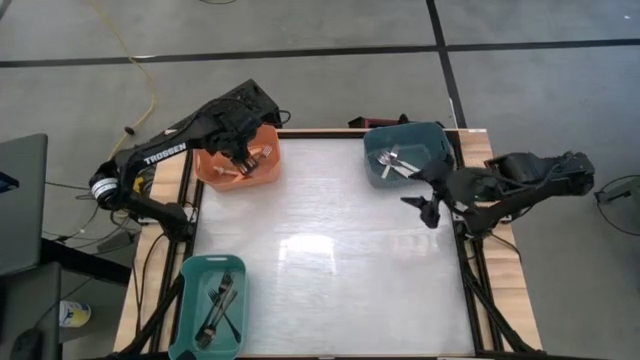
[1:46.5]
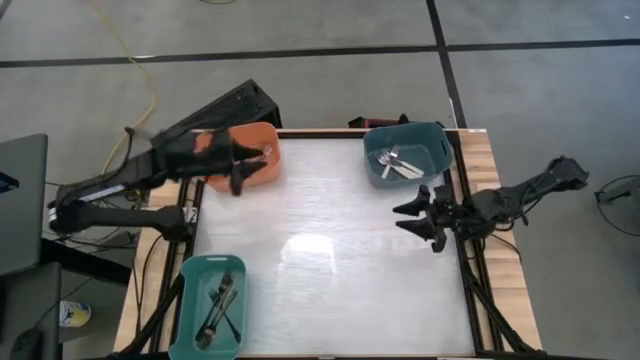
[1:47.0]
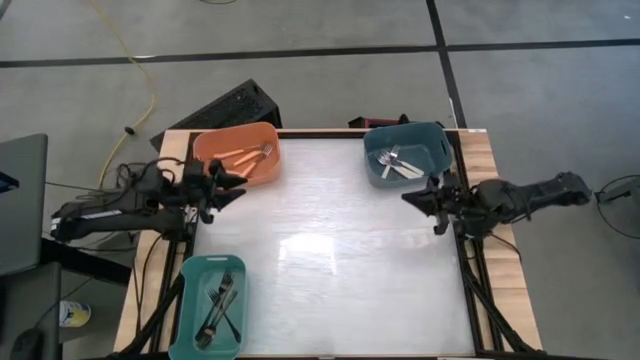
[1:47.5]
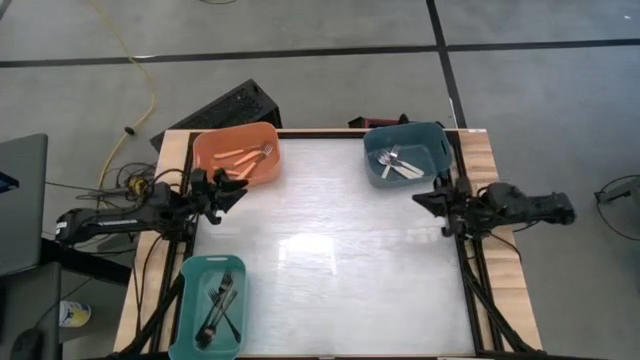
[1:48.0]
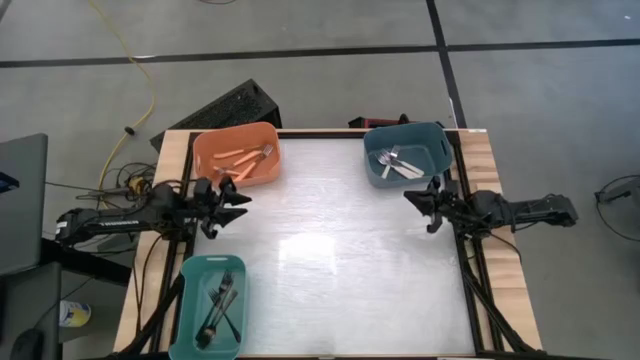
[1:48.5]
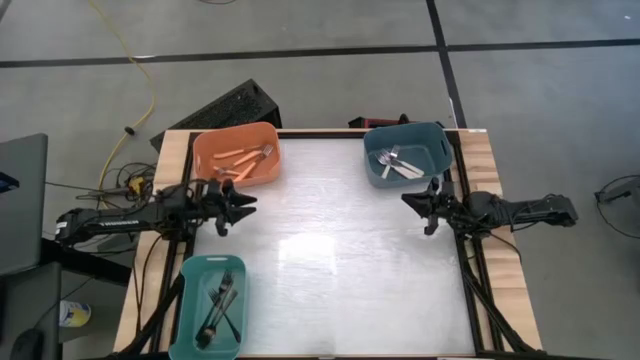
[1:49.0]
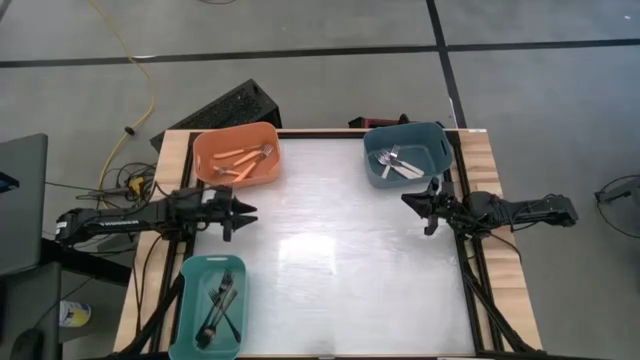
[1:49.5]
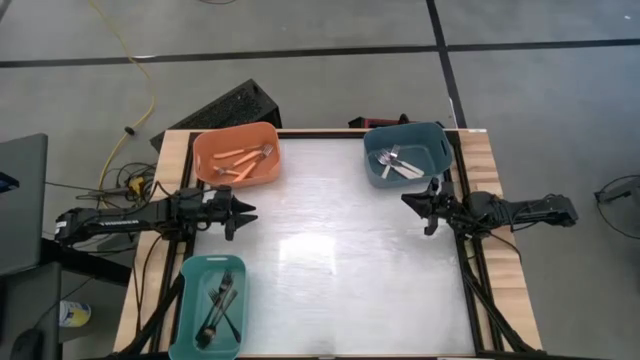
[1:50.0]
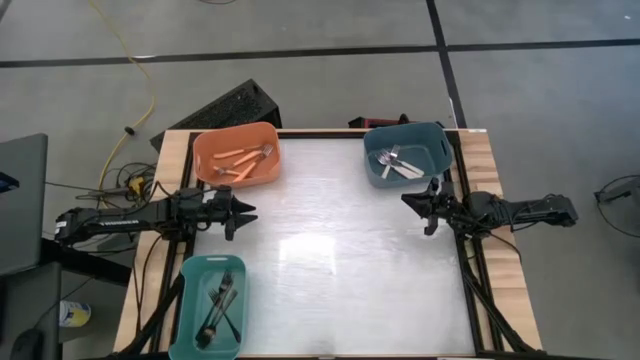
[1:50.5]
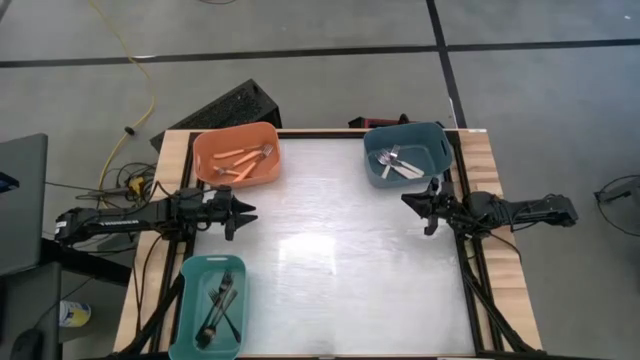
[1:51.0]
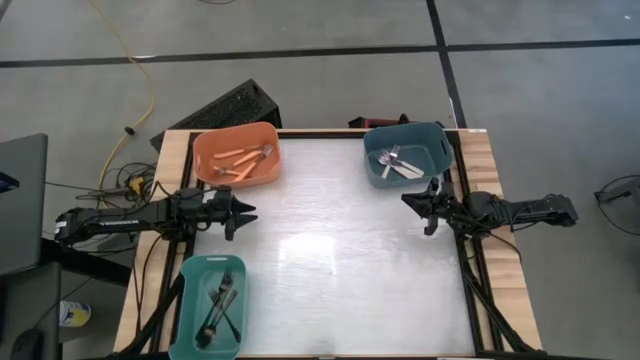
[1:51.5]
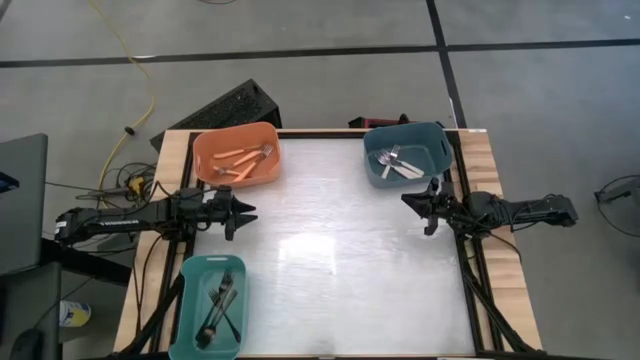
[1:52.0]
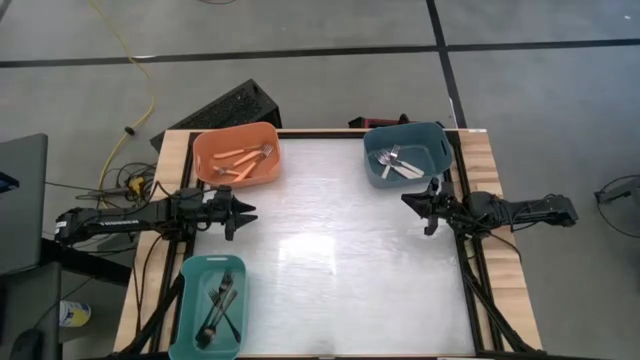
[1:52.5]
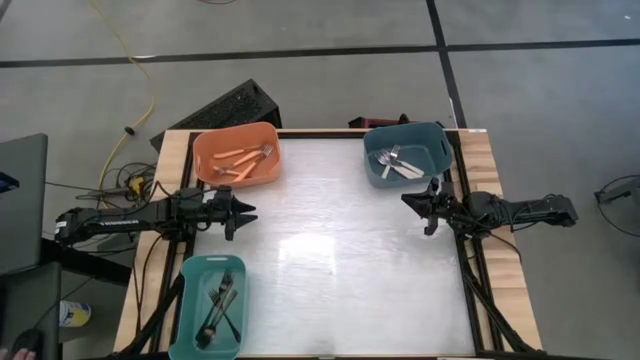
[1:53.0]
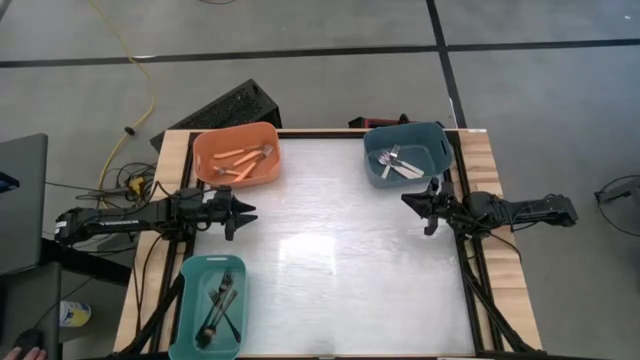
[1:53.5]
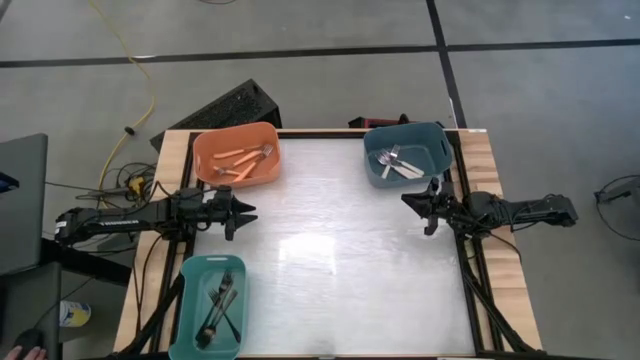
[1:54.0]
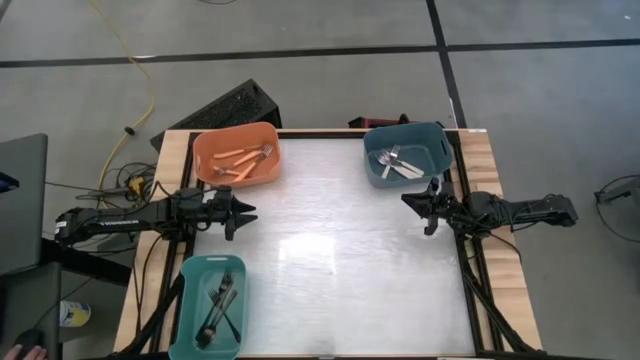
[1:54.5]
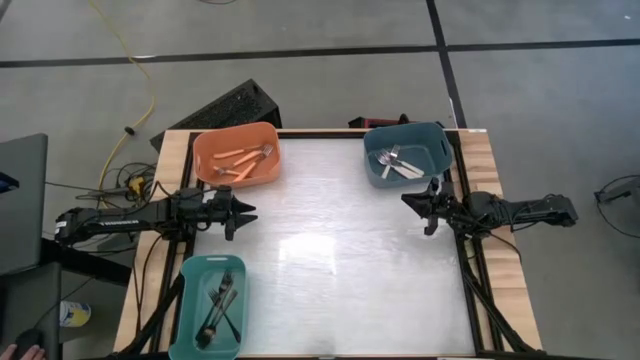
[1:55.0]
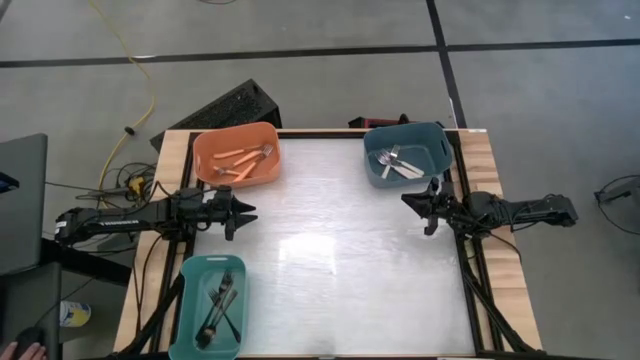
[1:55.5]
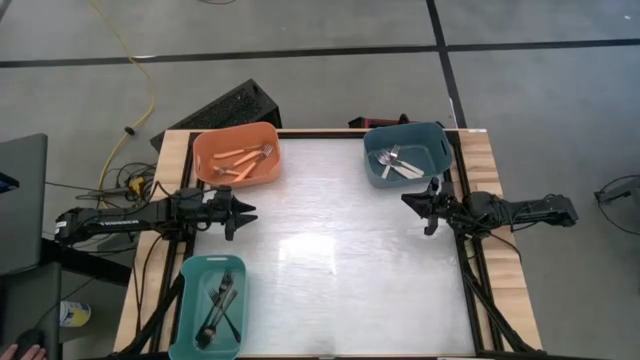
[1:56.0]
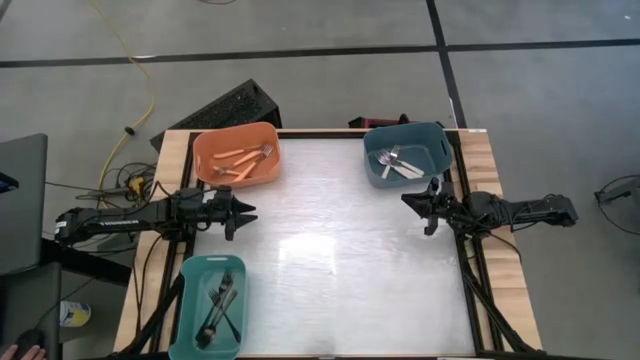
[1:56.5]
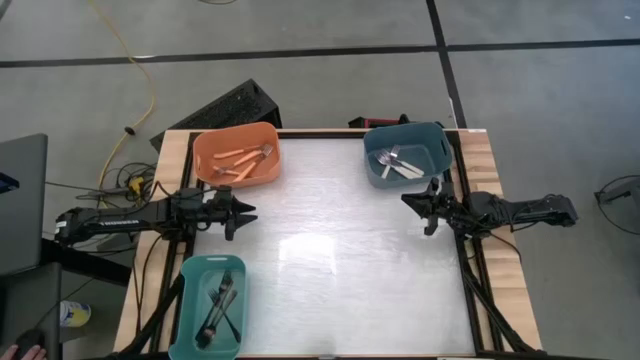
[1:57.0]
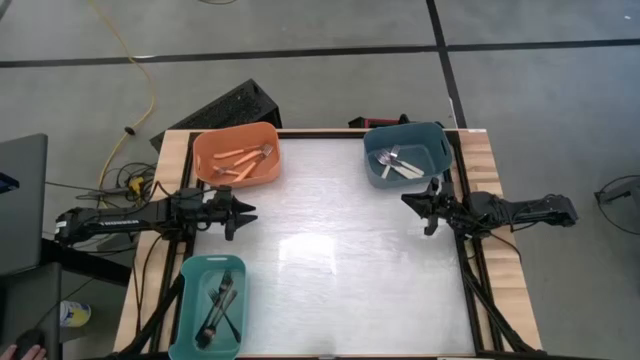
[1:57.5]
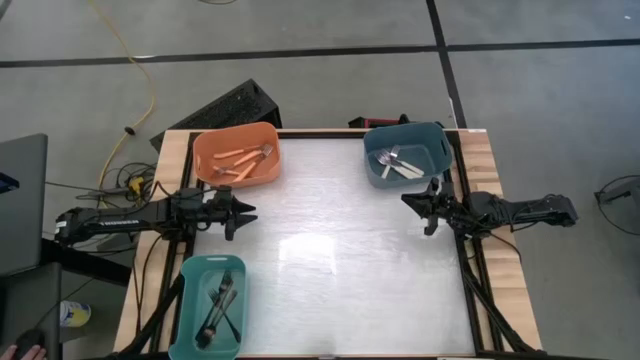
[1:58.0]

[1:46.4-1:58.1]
Task: Sort silverware by color (type)
Return to Home Position

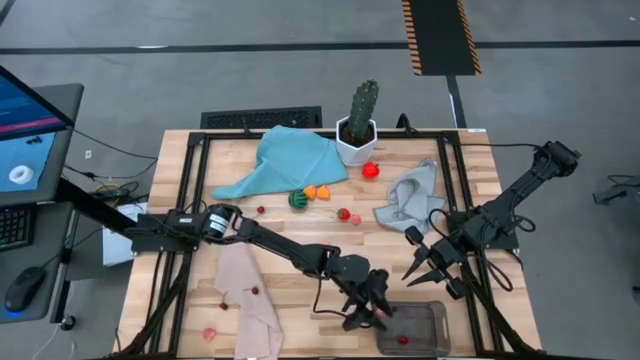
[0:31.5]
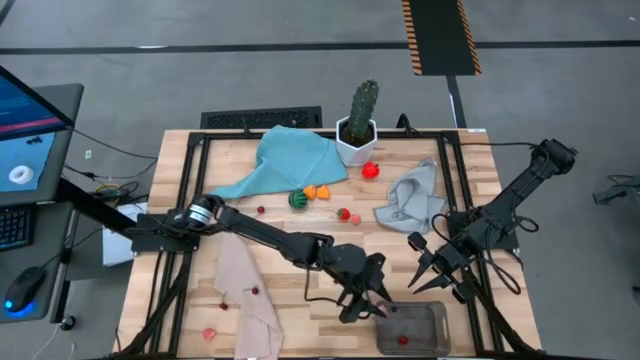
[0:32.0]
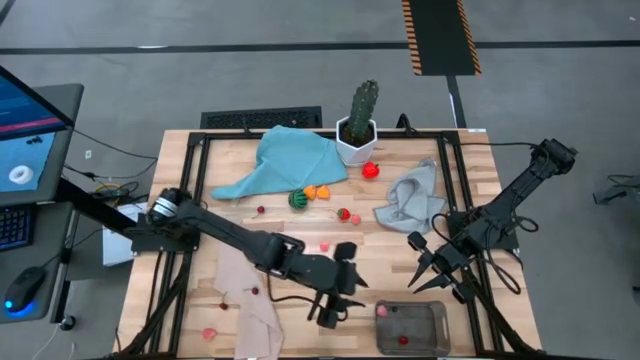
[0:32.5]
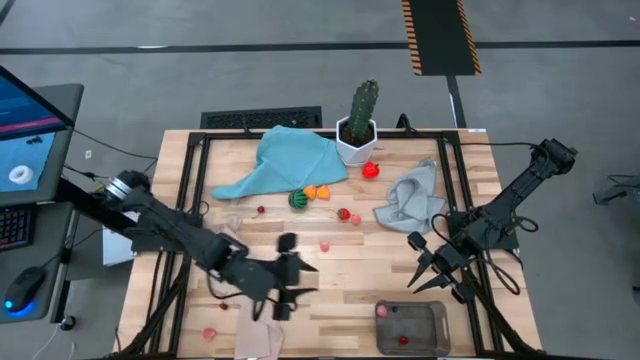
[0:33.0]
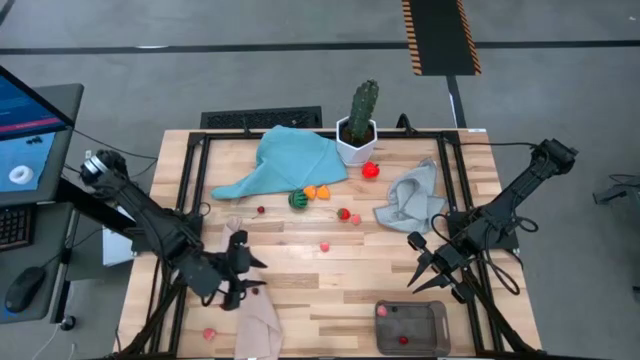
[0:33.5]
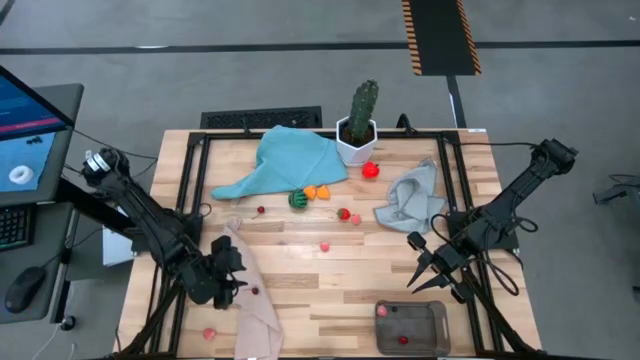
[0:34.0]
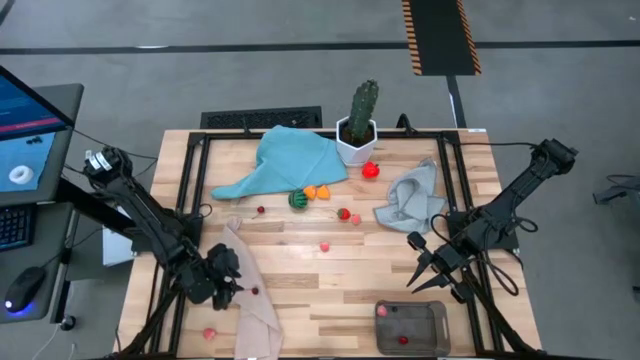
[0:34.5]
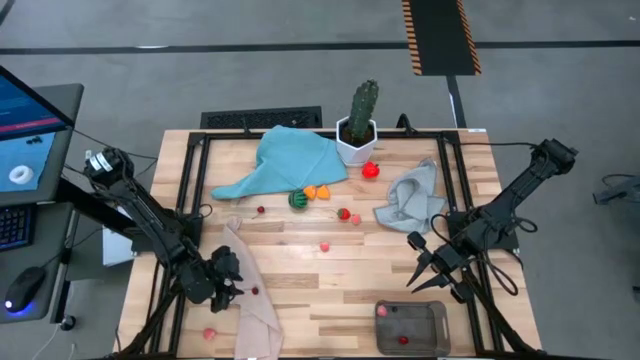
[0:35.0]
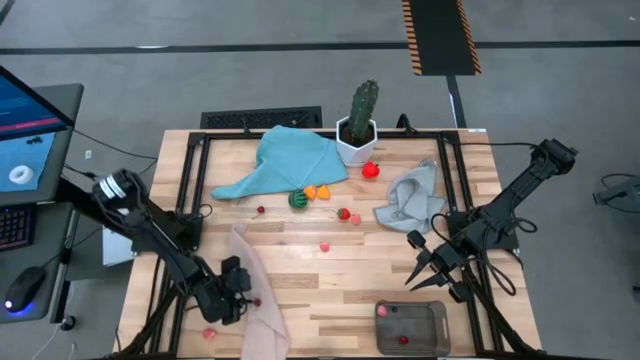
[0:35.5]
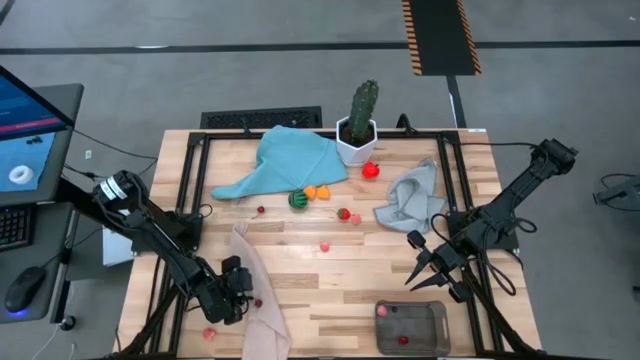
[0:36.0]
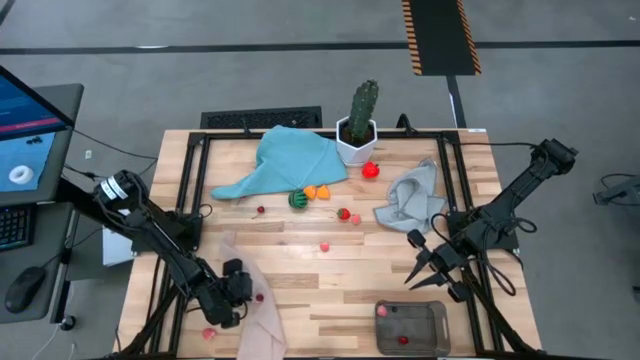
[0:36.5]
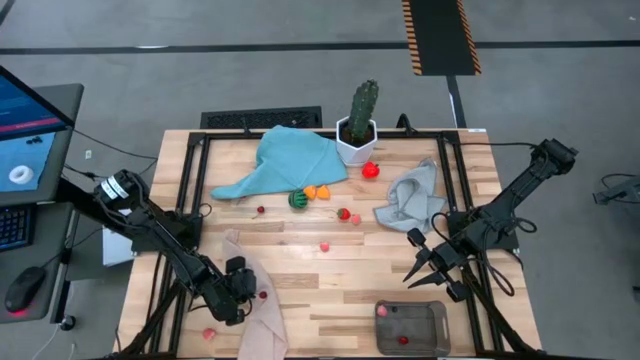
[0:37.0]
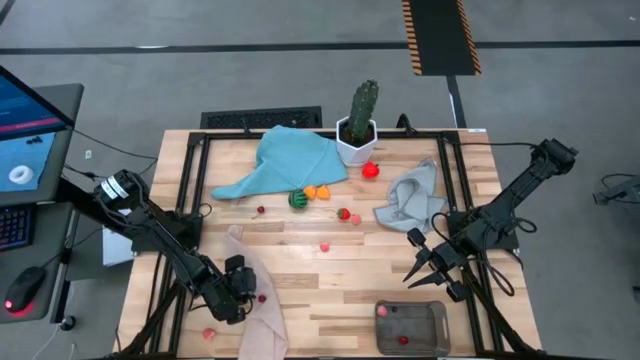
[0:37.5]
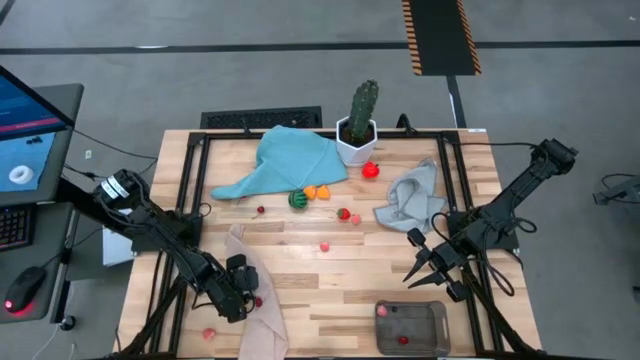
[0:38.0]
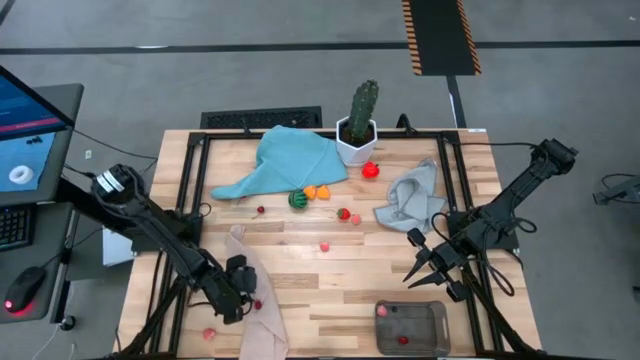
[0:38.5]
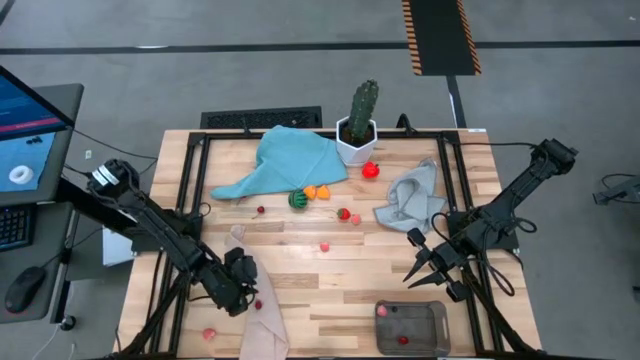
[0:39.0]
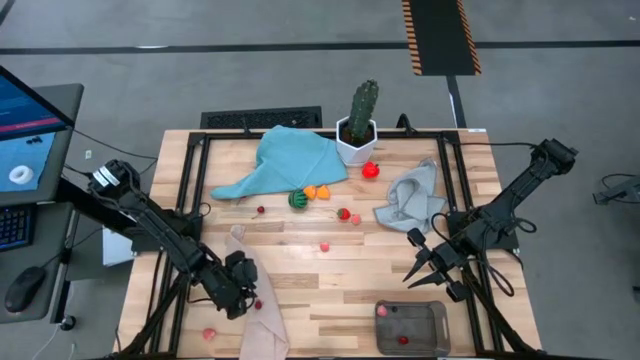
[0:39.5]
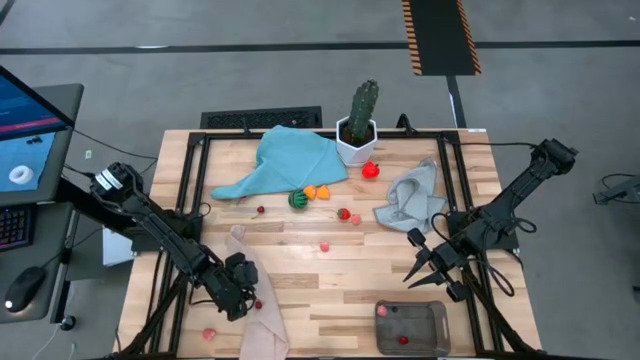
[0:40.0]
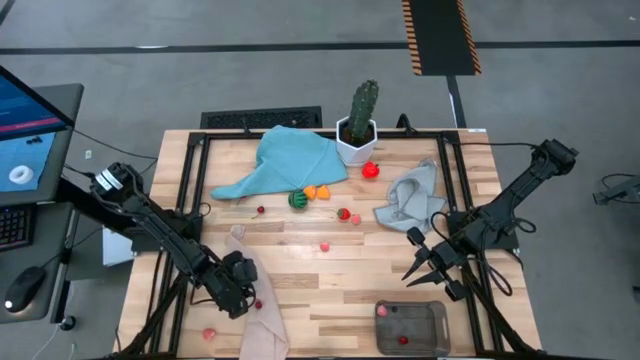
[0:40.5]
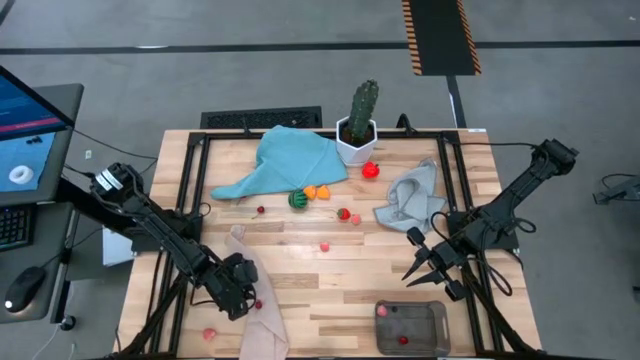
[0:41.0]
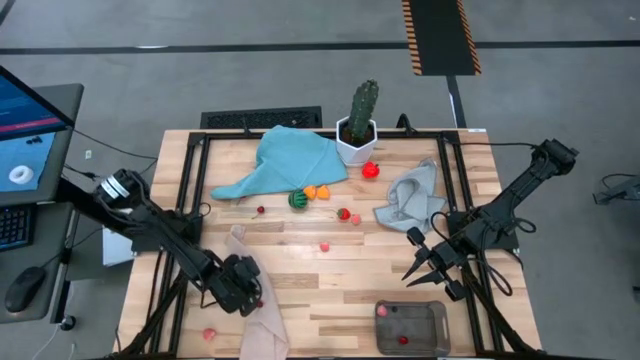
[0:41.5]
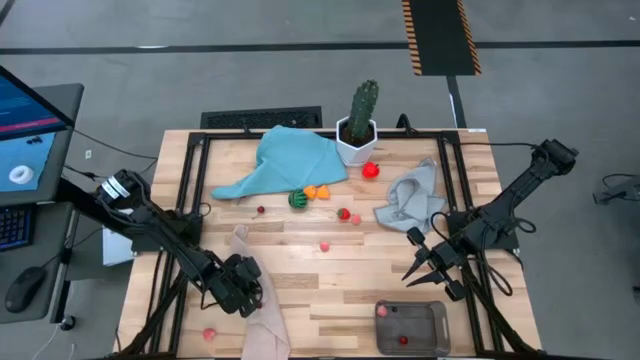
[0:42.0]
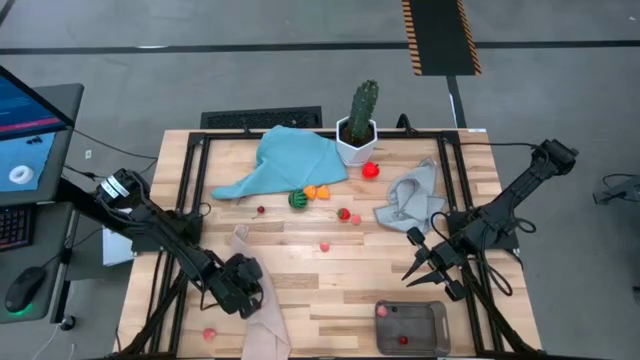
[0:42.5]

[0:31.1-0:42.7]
Task: Pick and placing Produce into tupperware
Put the cherry into the black bin
